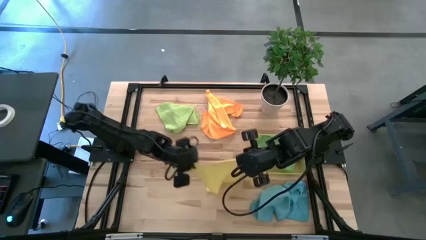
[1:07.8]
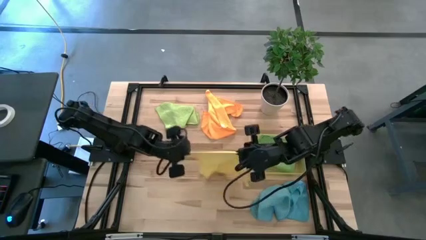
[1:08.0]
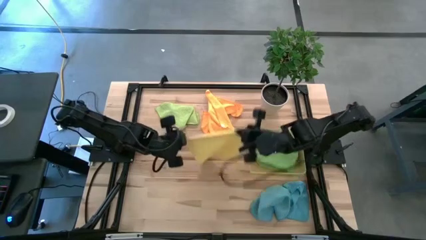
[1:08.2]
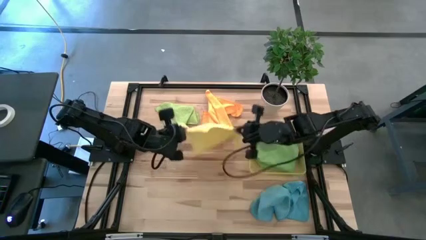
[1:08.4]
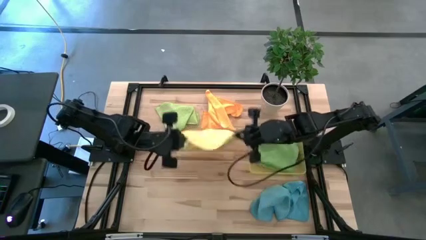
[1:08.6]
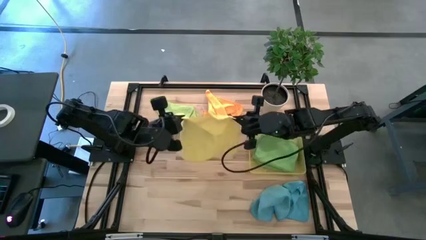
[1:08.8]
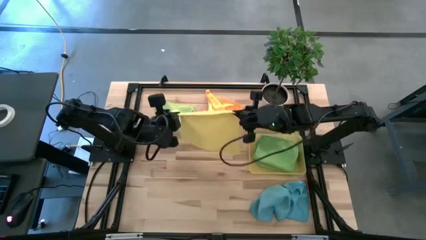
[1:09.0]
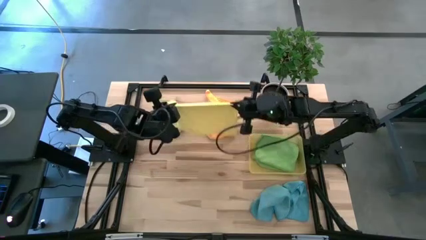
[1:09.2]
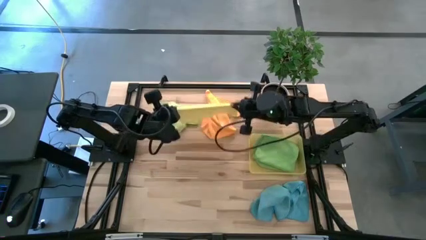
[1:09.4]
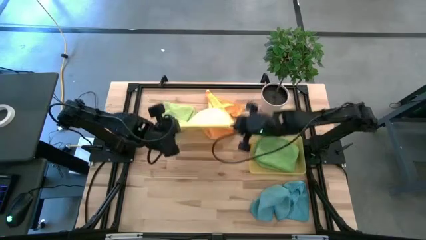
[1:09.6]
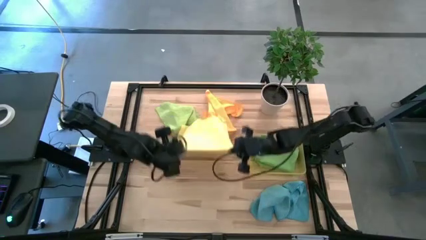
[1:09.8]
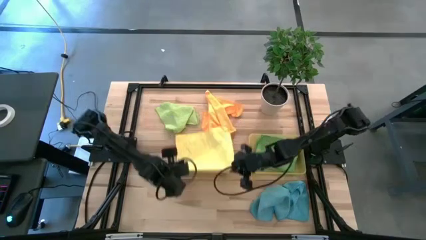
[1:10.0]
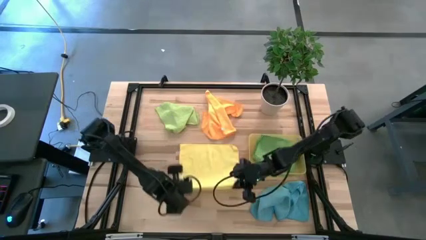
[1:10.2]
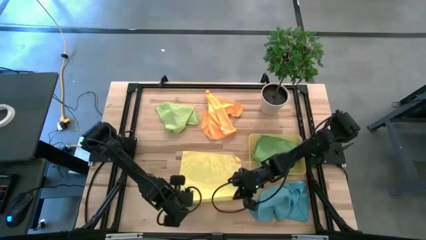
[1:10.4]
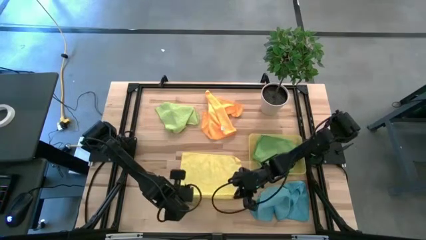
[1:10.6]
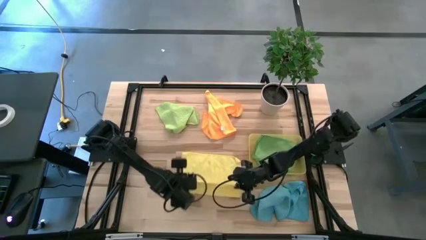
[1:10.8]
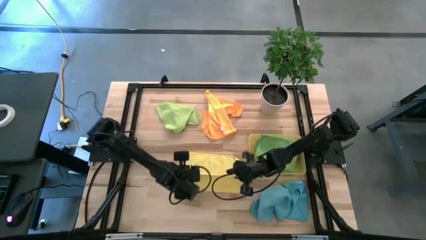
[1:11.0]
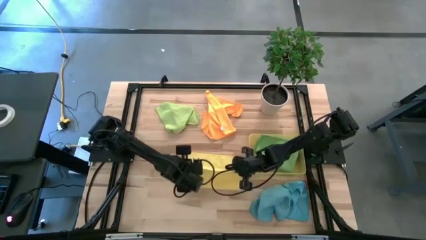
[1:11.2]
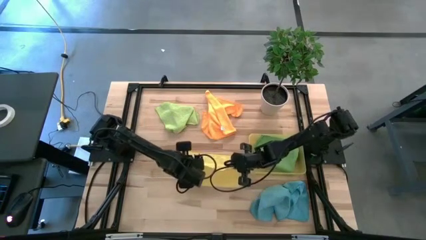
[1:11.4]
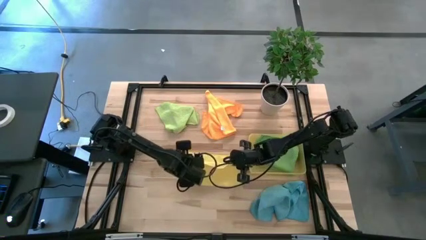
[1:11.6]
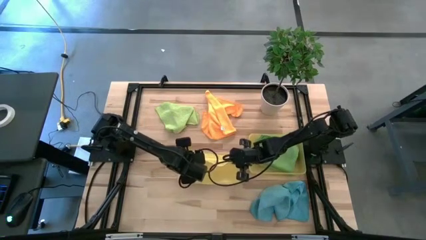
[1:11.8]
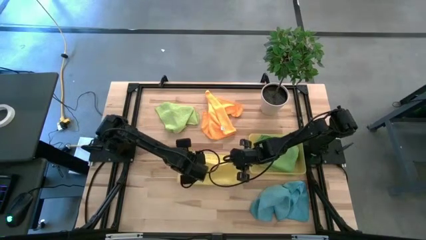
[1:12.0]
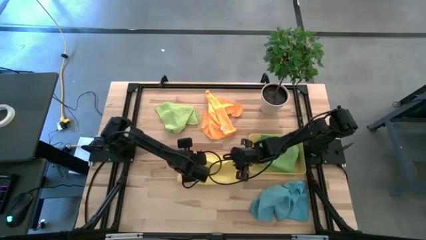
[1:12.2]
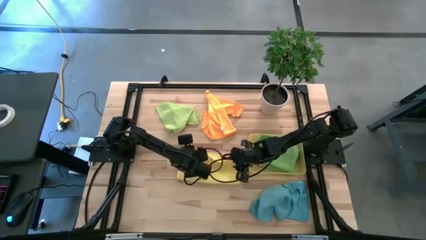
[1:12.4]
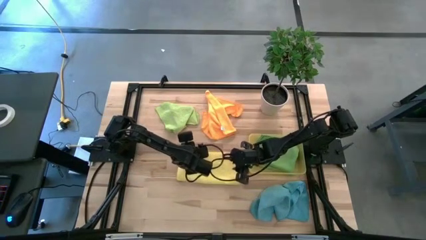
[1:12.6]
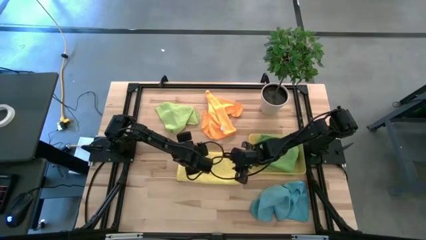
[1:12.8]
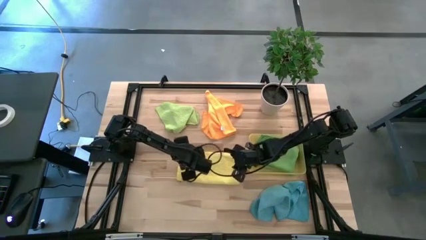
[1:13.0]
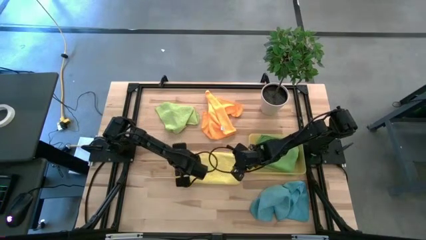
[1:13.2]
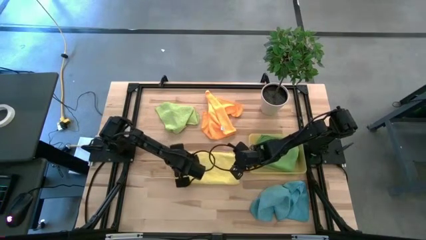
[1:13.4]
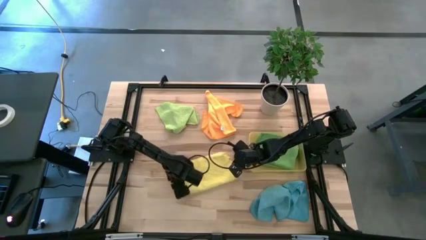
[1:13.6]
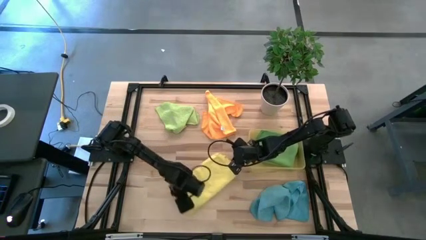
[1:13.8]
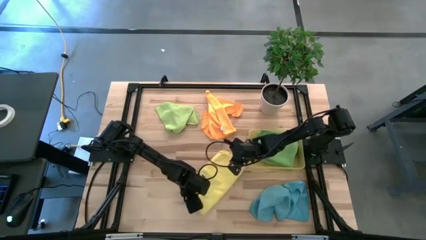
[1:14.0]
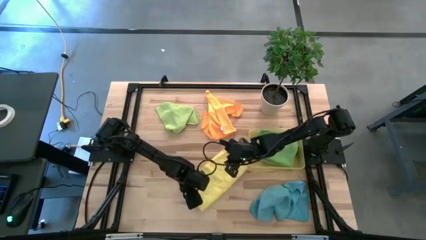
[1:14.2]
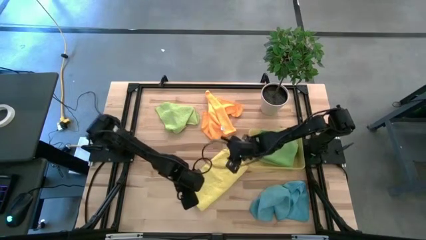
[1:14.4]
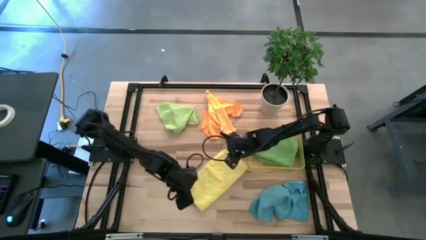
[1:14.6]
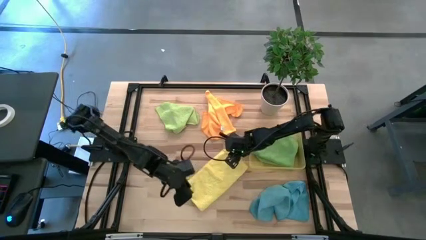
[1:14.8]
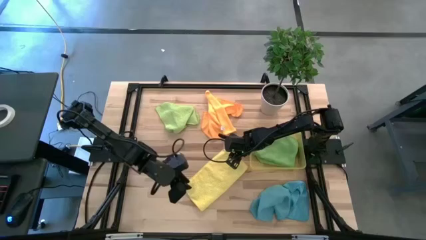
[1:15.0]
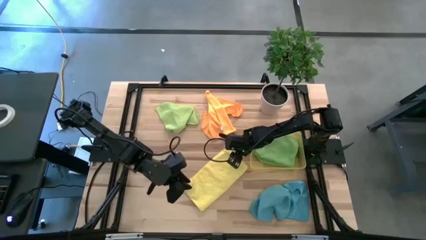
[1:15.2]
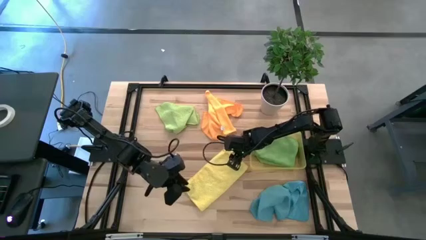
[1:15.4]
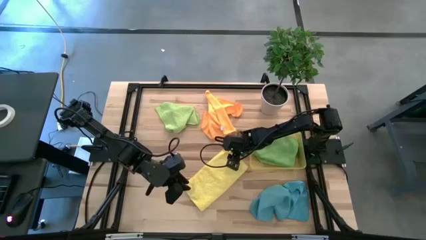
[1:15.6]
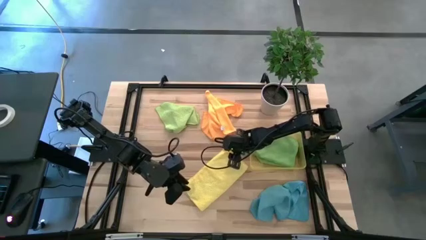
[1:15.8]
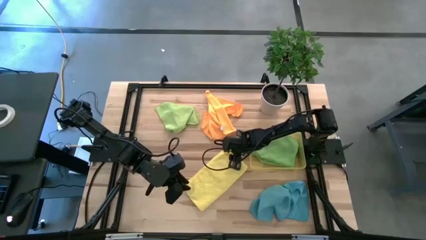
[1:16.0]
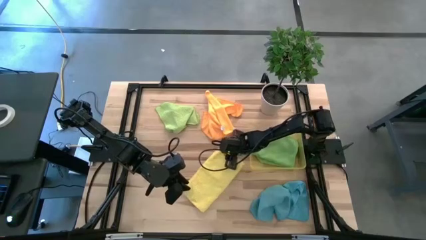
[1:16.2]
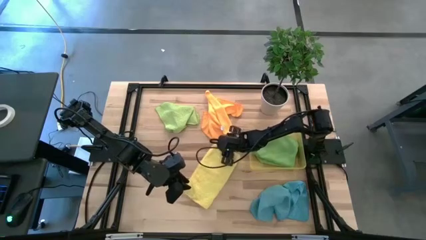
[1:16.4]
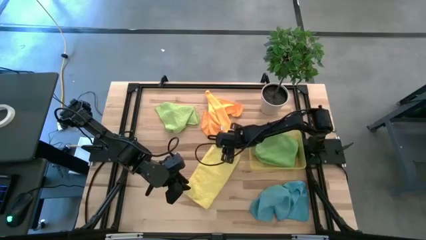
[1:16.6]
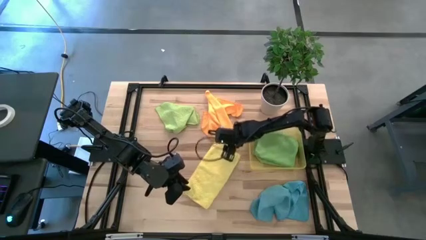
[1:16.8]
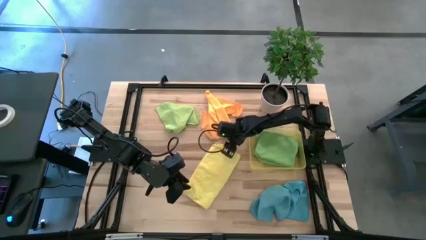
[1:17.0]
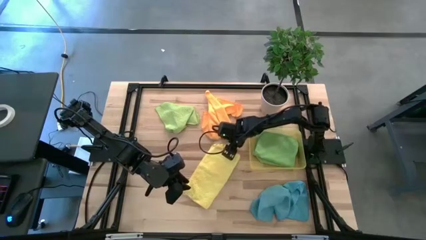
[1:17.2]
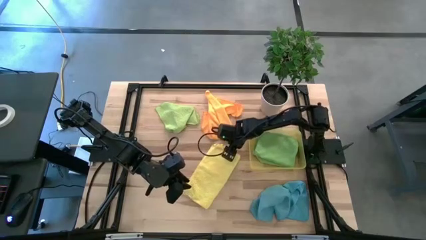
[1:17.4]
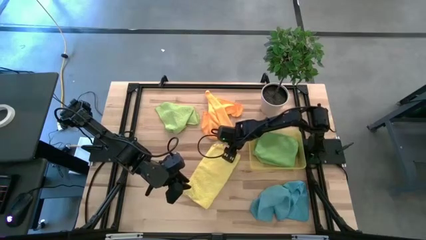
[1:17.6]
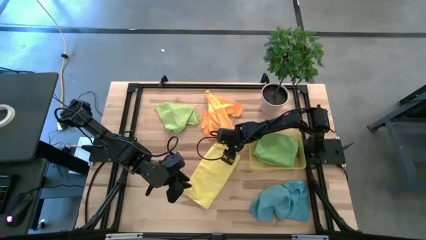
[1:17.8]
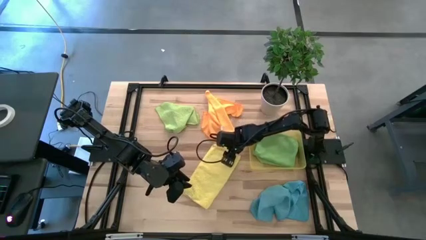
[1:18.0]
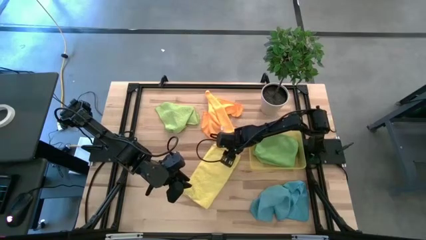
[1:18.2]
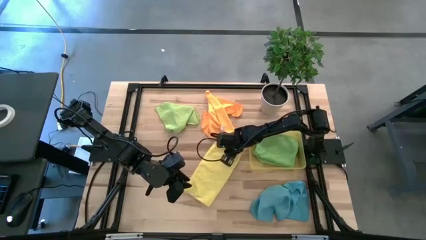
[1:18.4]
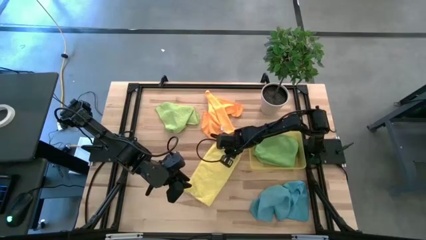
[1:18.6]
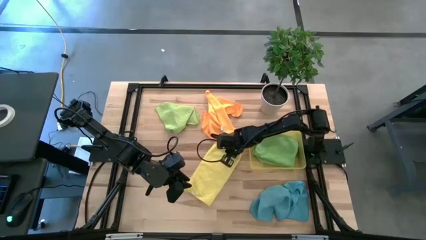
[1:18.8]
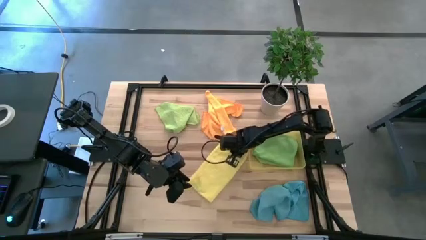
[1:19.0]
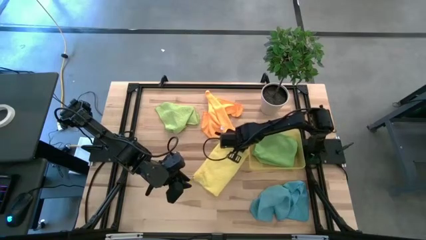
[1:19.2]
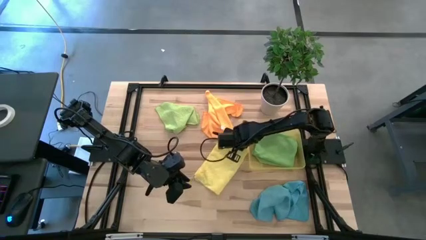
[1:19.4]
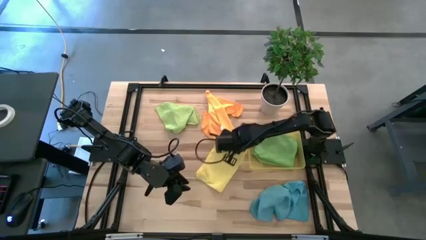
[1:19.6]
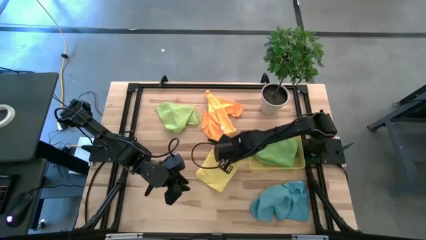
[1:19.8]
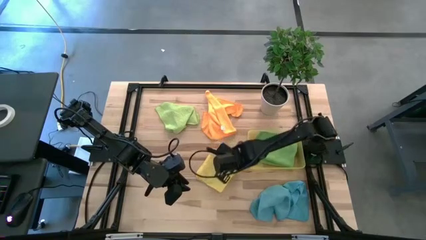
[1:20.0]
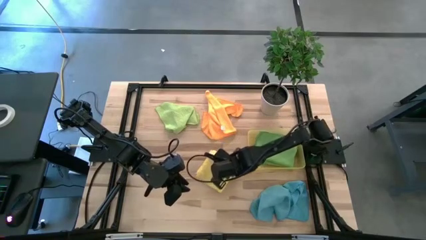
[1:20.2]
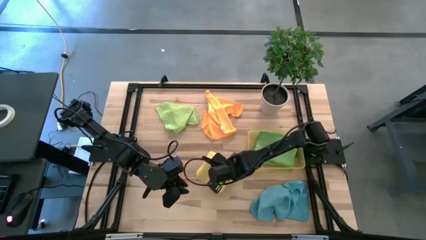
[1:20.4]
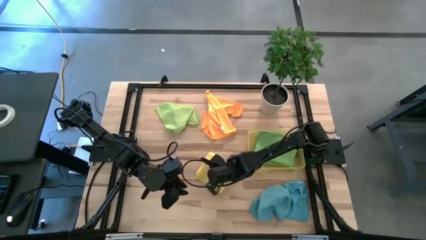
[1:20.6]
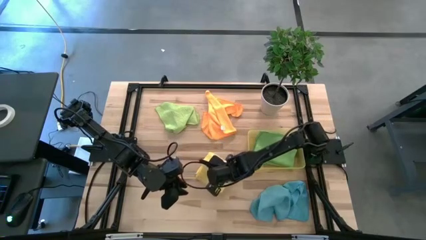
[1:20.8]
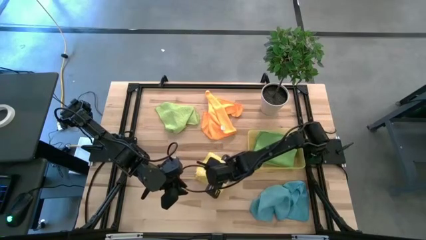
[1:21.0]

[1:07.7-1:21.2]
Task: Fold microfiber towels
Fold the yellow microfiber cloth

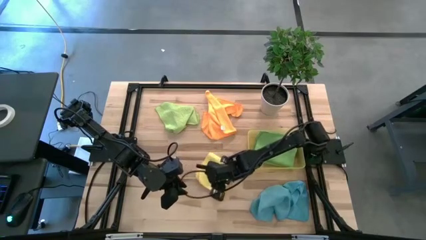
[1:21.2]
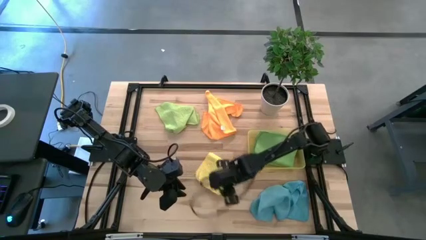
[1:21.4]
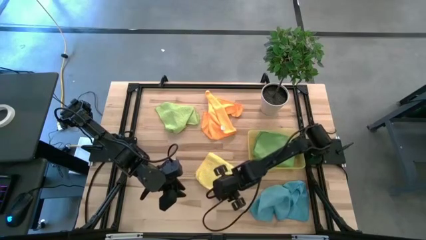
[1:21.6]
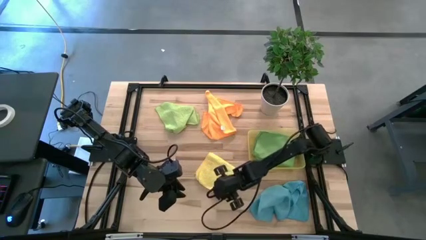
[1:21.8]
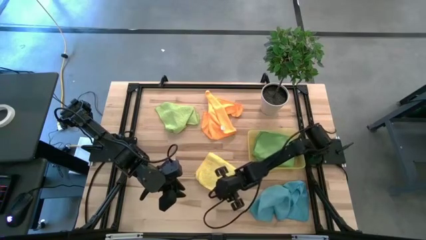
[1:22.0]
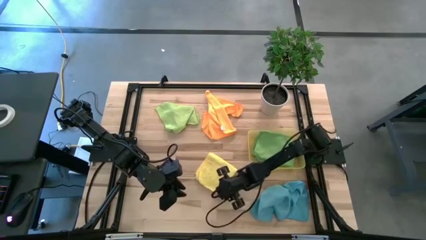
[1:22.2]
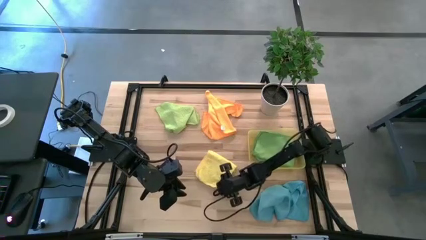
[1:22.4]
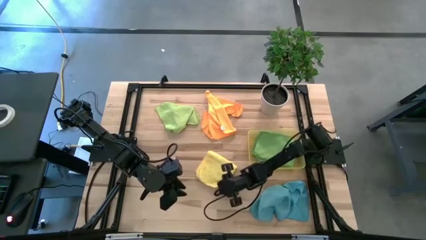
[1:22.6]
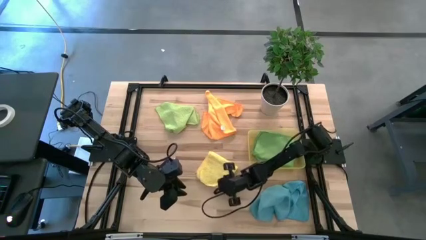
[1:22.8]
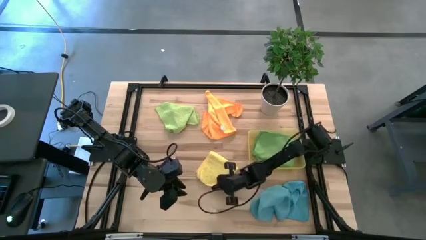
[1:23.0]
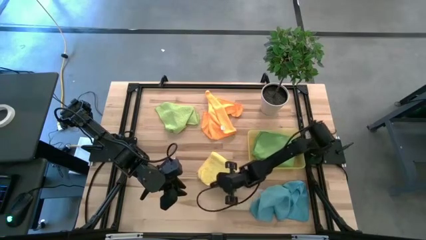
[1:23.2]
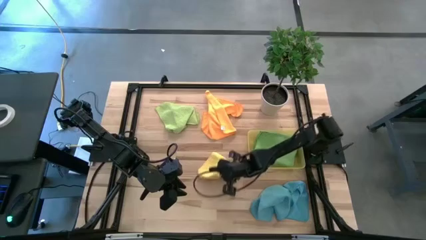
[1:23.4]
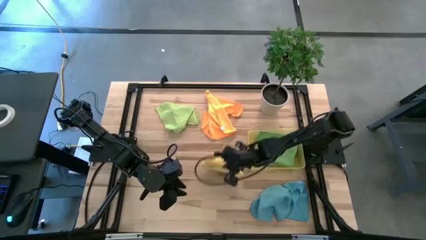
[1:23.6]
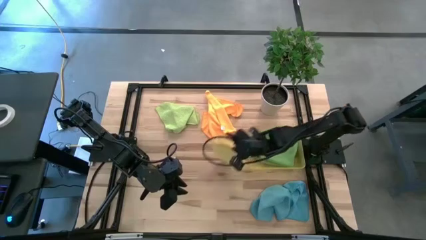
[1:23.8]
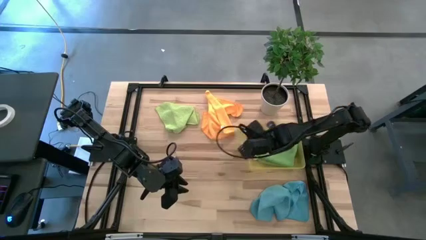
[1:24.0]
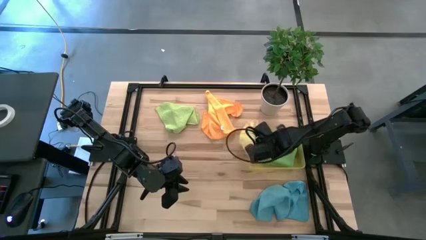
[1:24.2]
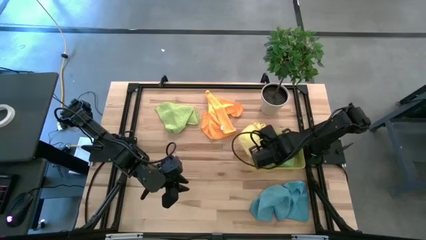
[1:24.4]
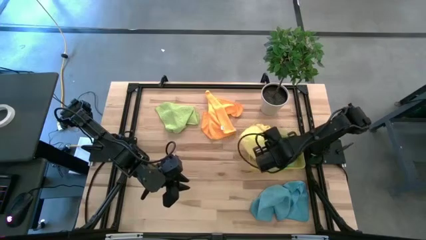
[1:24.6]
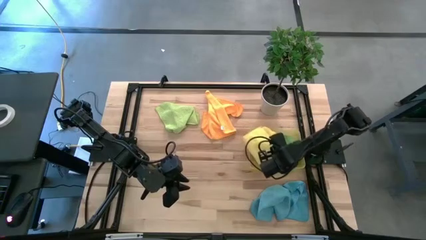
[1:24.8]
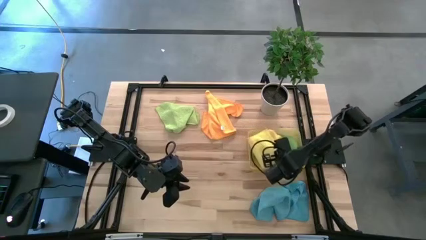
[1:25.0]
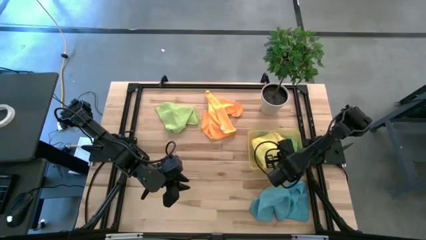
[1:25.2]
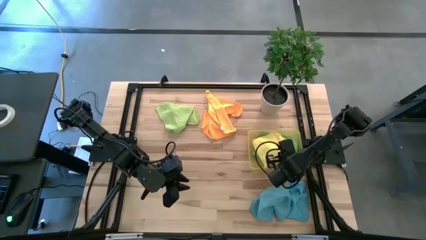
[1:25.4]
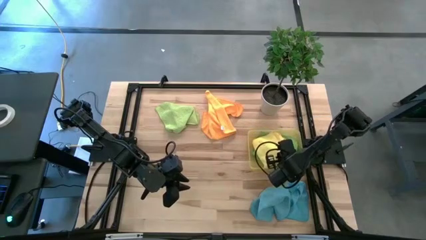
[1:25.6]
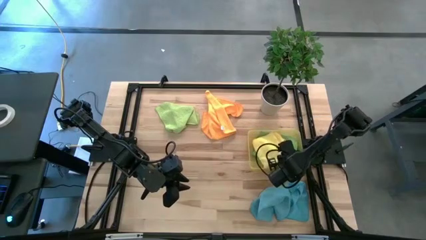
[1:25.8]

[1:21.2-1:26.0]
Put the yellow microfiber cloth into the yellow bin
